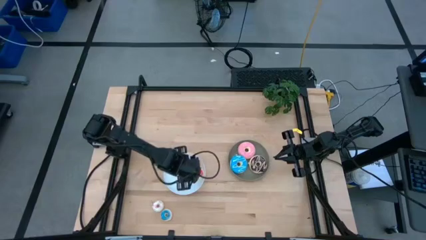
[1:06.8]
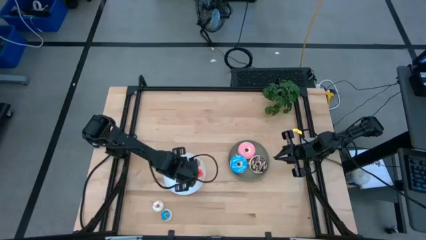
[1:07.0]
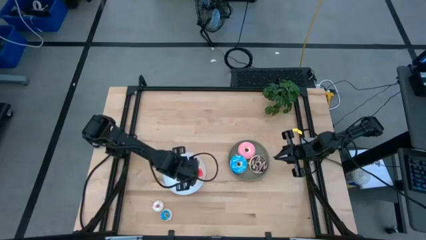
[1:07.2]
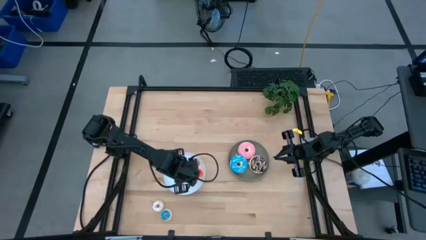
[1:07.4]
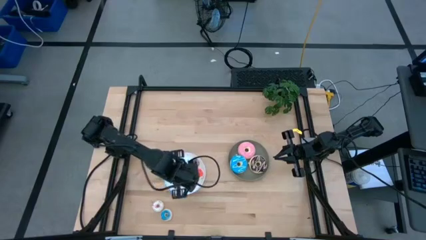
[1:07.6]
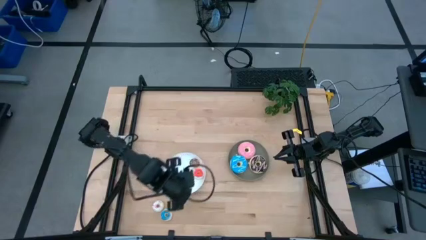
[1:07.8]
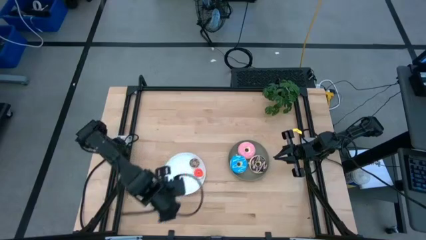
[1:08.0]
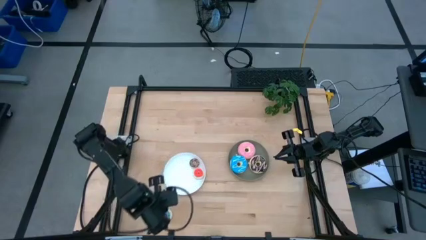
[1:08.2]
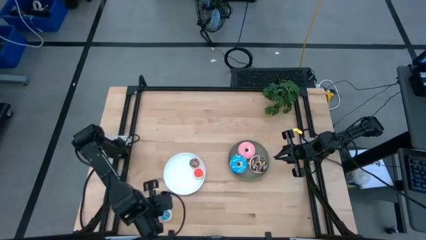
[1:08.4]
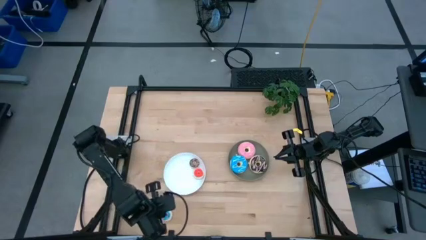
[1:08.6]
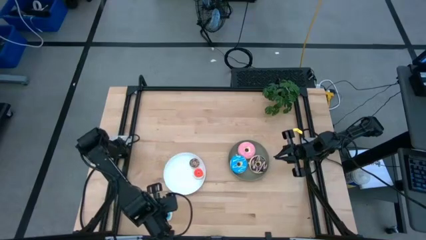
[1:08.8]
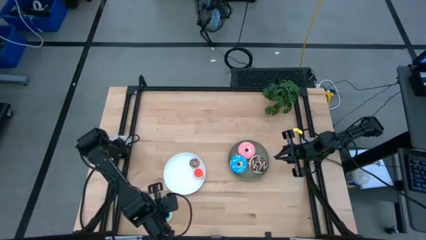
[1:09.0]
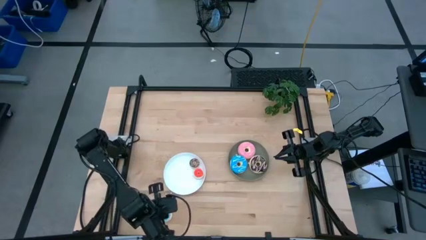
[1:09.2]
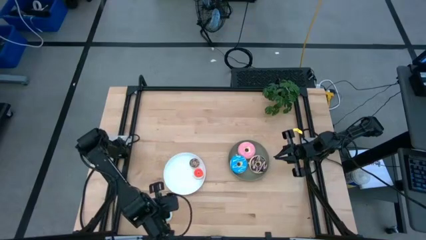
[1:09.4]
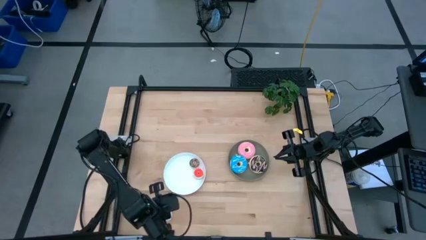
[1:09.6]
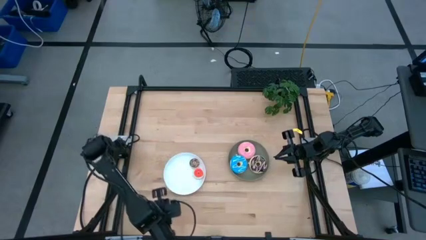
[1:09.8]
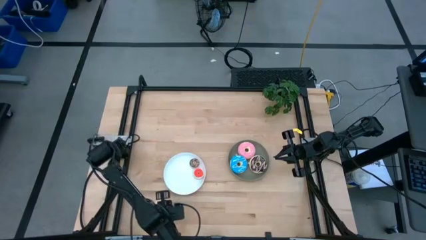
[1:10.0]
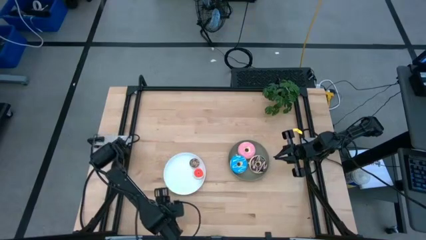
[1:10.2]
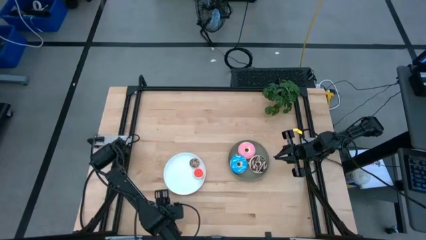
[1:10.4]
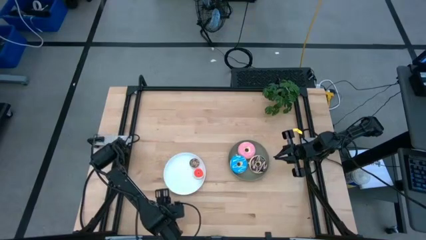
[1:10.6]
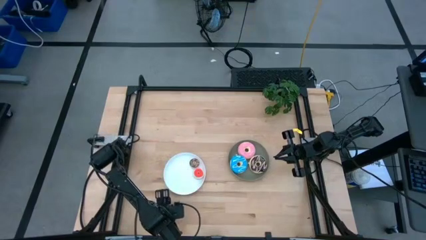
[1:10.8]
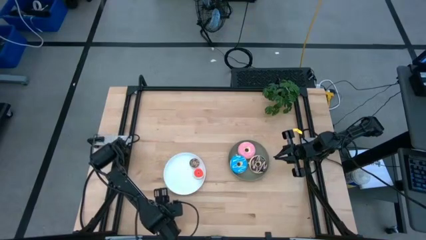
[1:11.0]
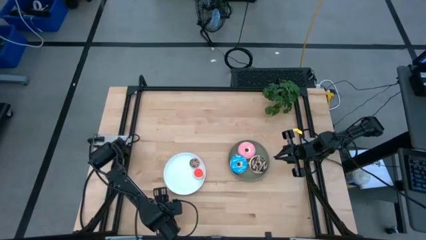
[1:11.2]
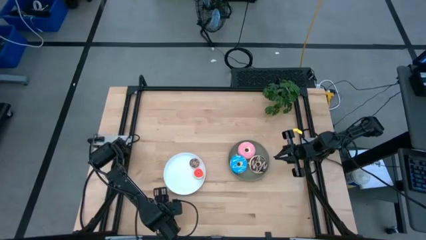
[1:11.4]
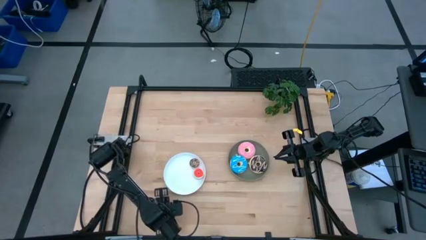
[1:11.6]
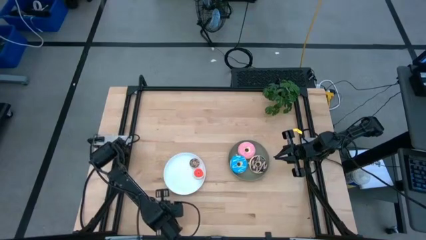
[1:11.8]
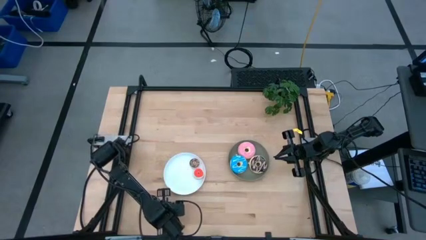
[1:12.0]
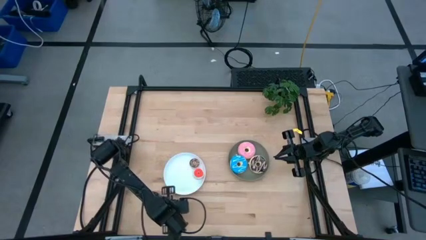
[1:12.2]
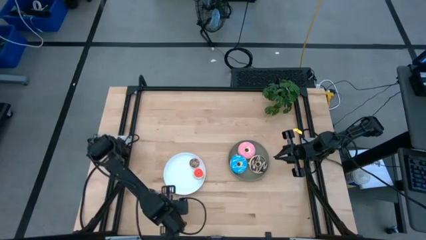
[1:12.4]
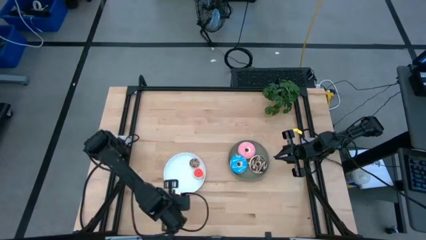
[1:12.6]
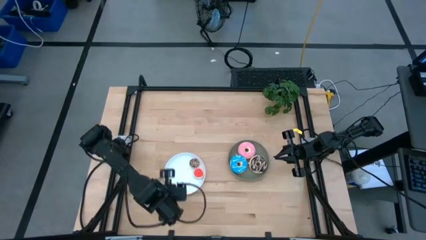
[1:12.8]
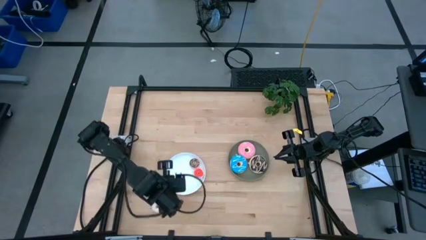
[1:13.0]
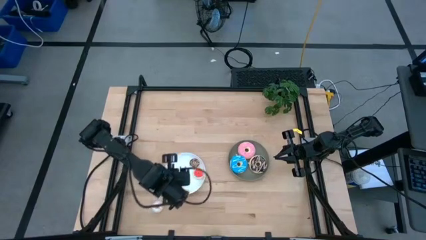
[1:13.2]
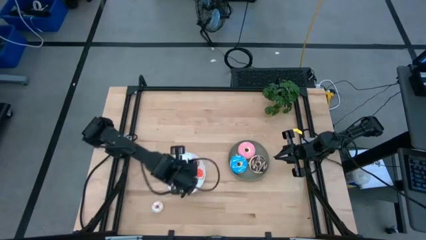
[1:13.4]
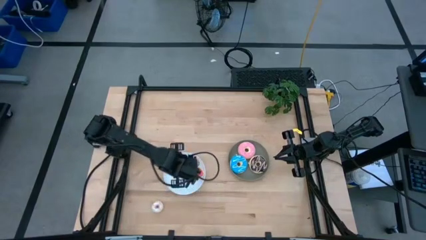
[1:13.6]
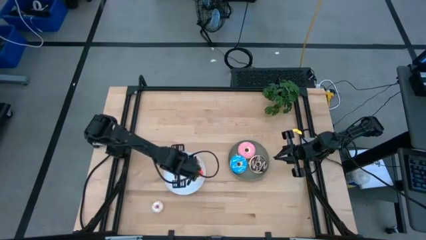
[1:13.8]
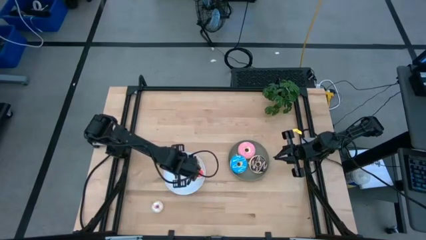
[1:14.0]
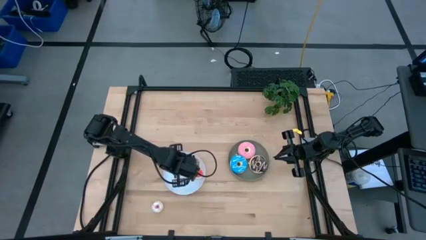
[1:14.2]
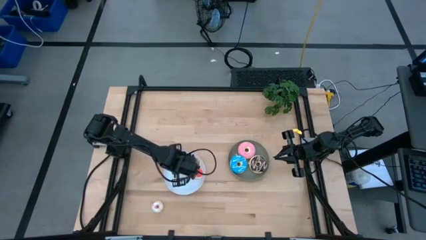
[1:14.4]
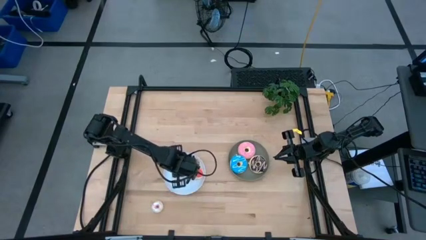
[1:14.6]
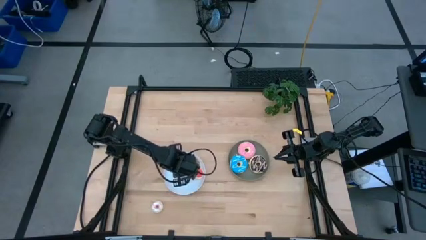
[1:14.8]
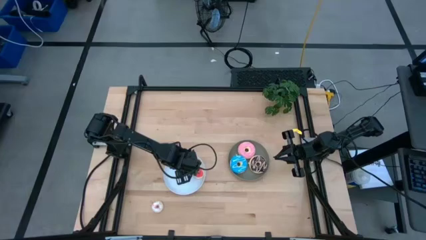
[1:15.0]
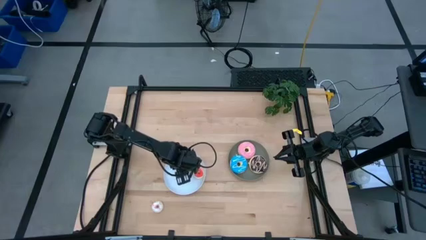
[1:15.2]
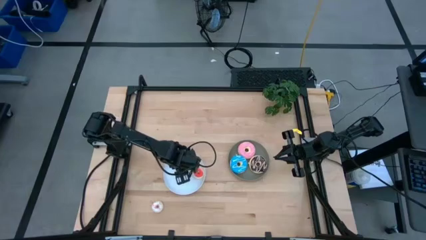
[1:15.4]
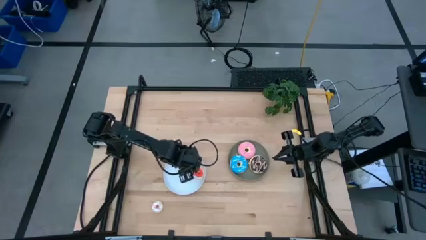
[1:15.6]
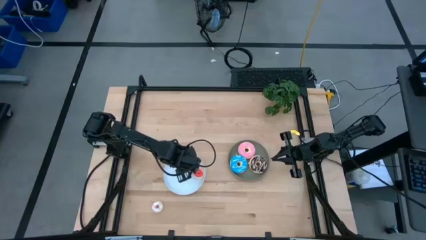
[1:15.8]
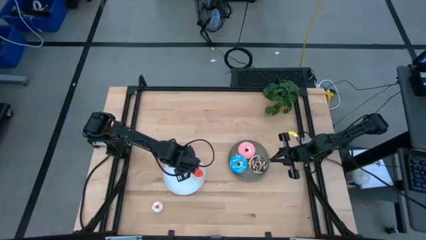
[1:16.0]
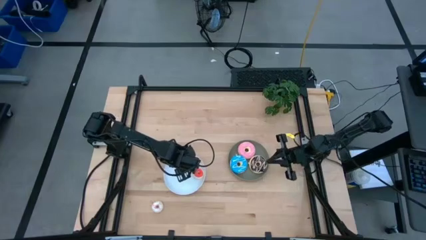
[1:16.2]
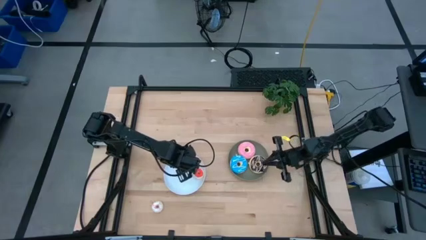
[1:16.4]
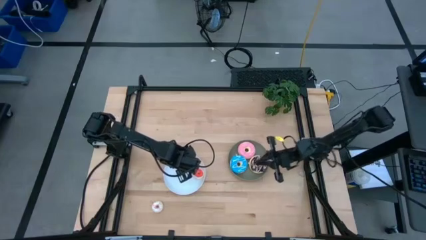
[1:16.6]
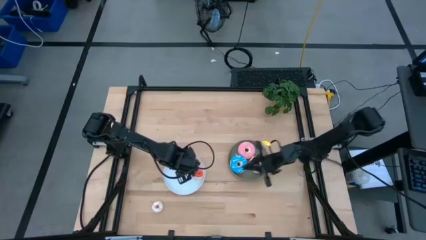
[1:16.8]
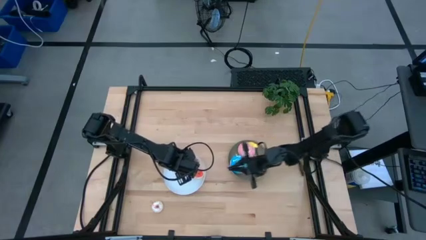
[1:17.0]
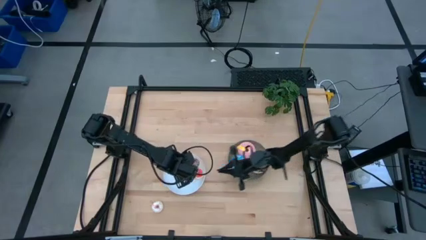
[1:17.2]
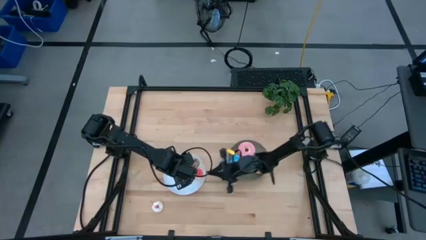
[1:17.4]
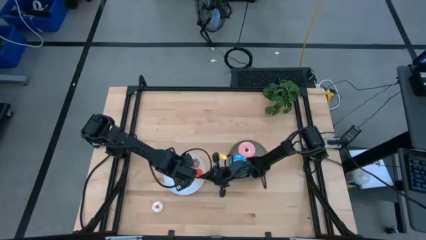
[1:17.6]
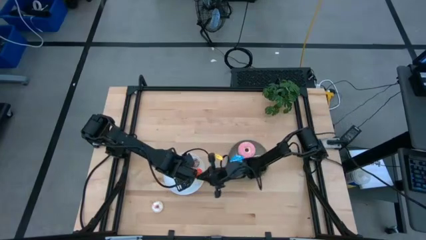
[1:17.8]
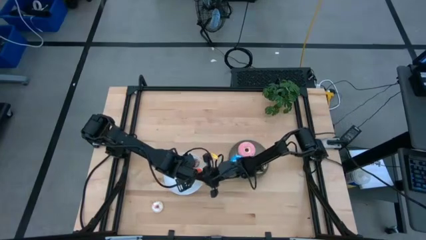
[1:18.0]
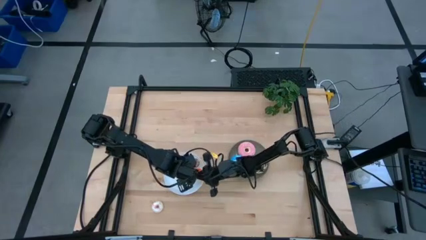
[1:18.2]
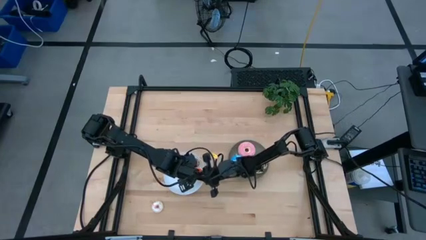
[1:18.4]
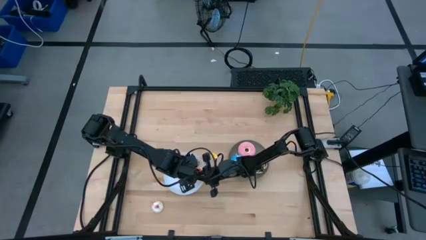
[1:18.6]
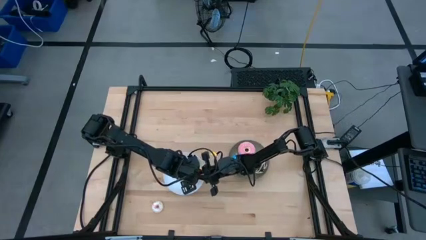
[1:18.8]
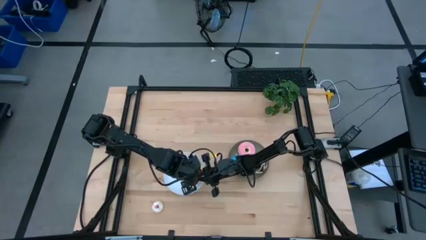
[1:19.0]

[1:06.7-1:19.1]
Task: Pick & Place donuts
Put the small blue donut on the white plate
